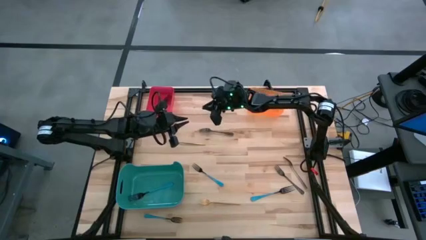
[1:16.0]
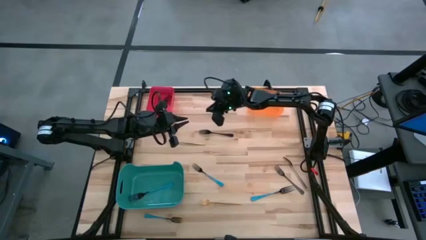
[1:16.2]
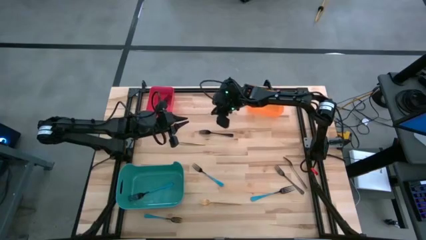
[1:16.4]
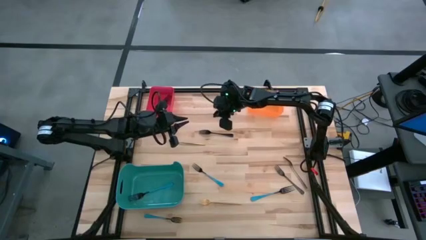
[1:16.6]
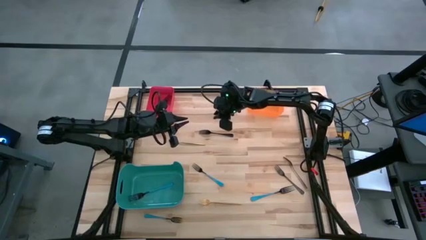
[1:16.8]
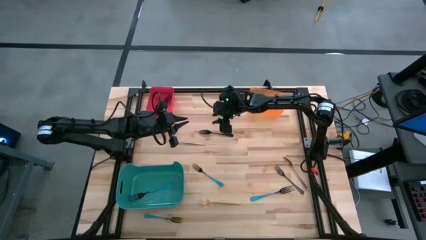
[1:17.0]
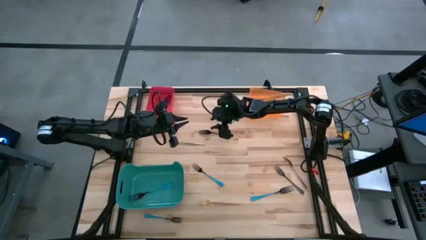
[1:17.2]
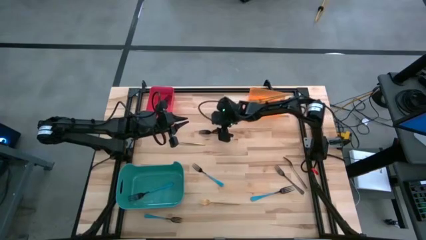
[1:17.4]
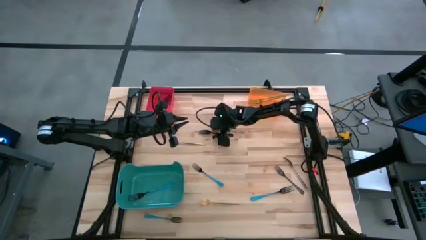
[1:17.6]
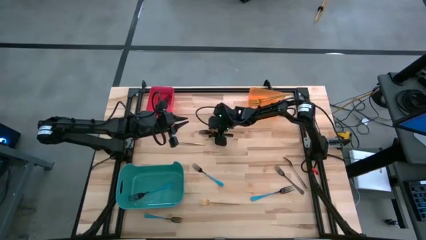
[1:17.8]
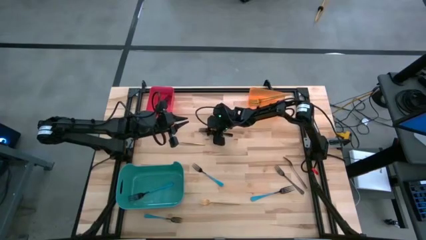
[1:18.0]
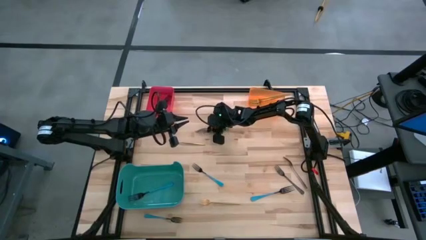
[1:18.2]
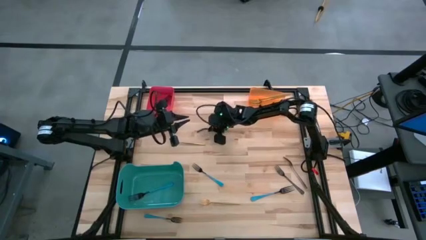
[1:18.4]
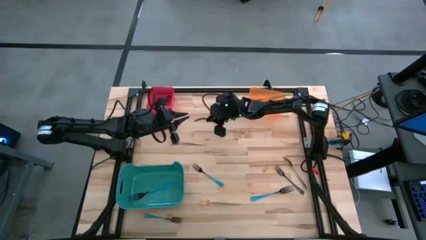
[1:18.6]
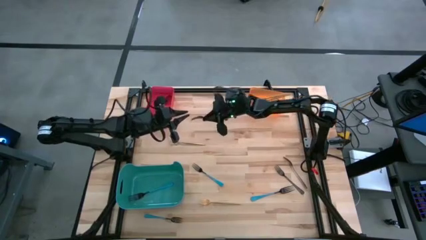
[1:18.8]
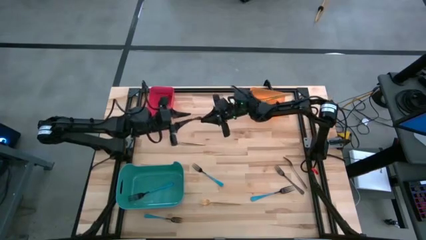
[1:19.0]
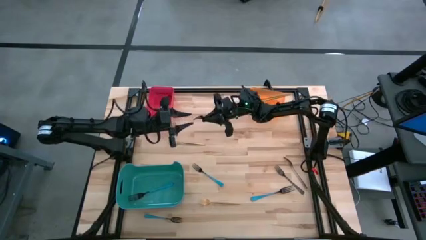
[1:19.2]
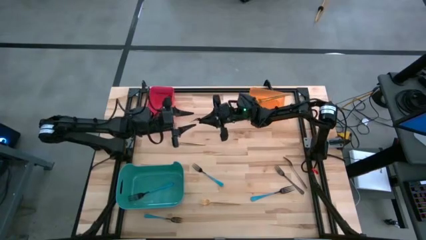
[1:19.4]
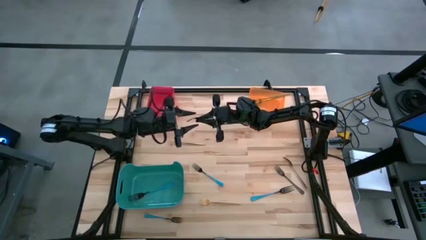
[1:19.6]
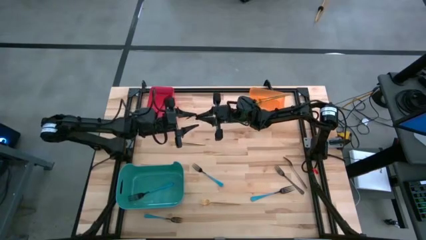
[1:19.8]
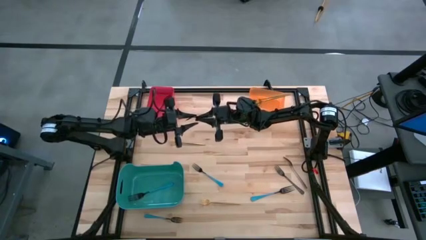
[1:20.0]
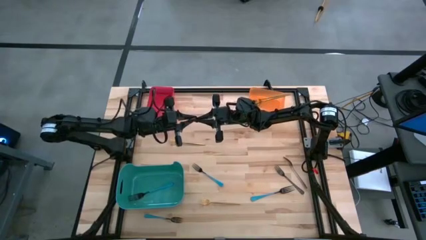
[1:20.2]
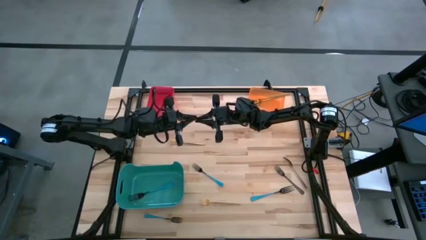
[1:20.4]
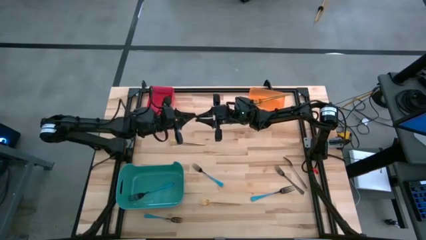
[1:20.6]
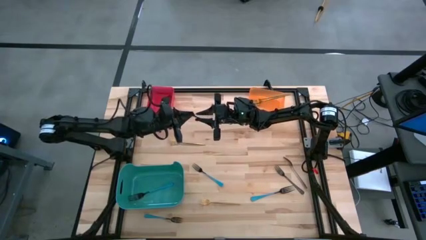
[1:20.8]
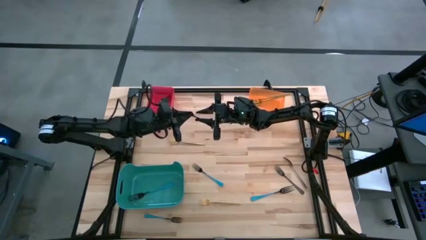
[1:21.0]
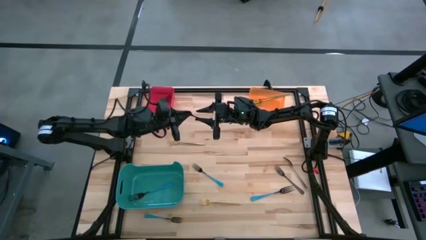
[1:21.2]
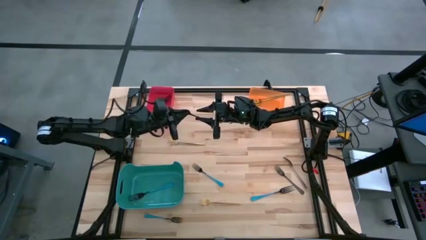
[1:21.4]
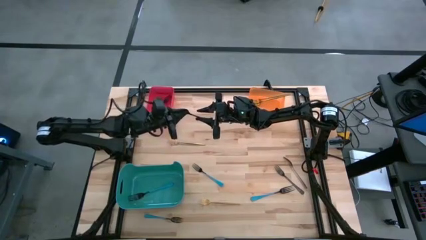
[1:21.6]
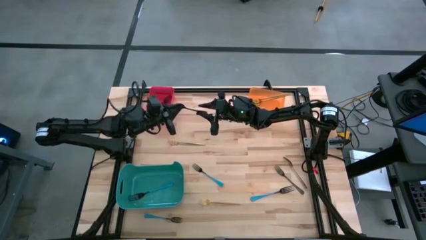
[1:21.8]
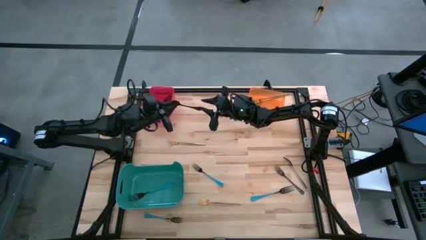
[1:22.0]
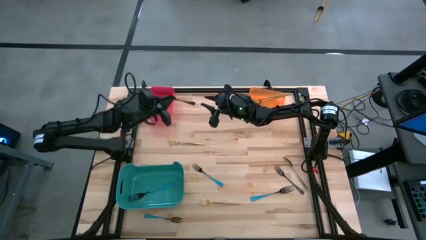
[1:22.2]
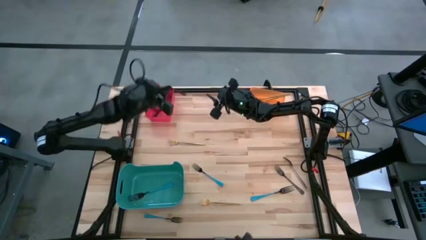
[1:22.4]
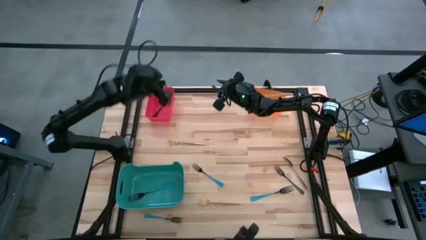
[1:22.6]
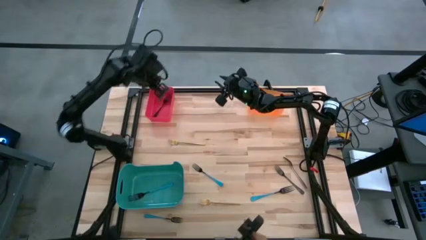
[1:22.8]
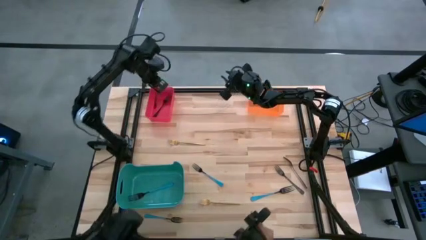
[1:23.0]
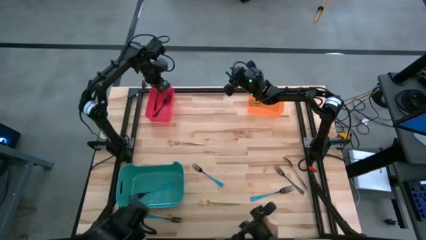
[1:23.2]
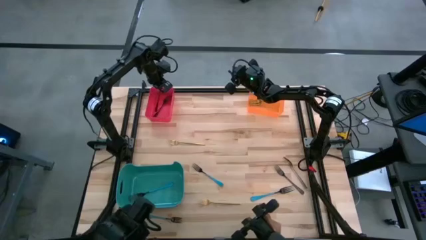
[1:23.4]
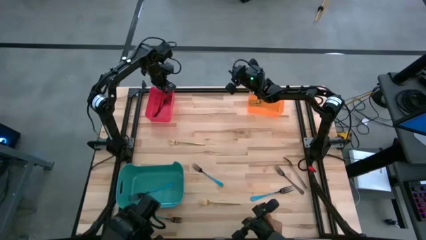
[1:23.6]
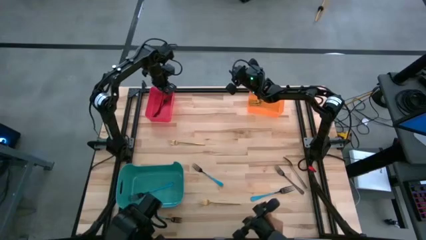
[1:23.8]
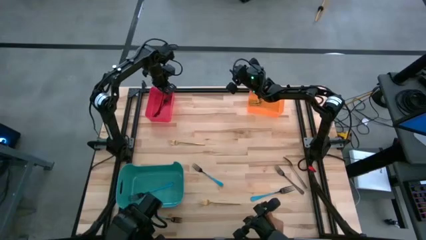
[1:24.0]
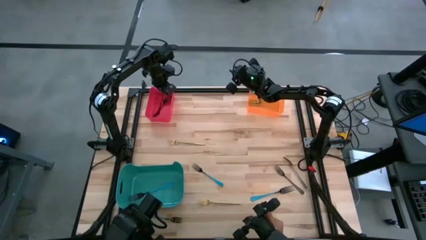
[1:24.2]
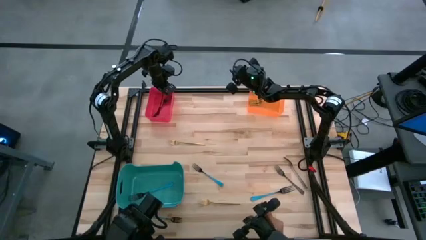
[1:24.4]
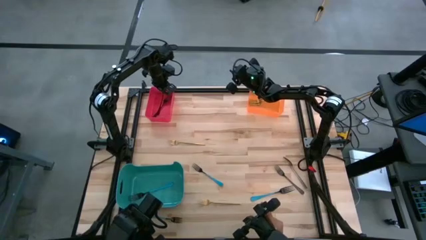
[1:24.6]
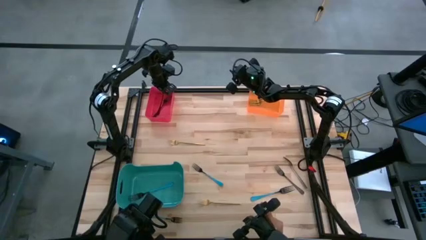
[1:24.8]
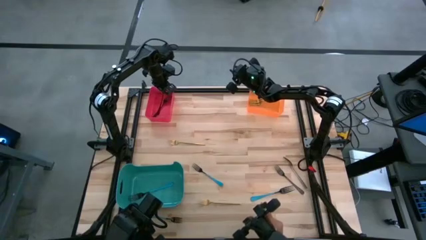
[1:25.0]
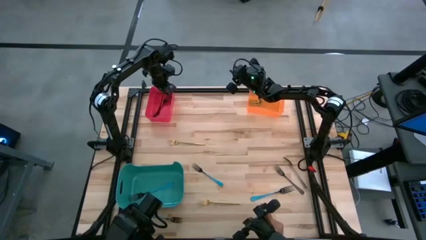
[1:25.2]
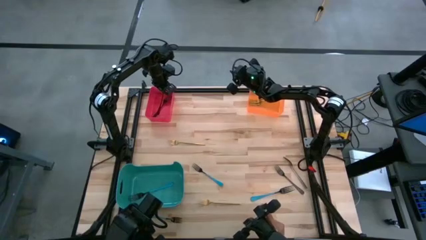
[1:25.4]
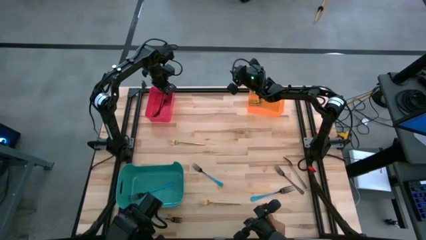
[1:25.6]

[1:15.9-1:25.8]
Task: Sort silverware by color (type)
Put the black fork into the red bin

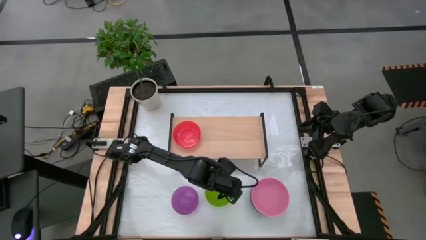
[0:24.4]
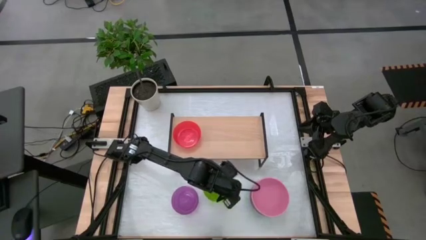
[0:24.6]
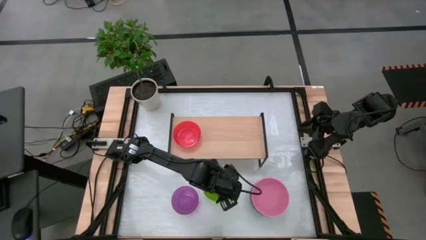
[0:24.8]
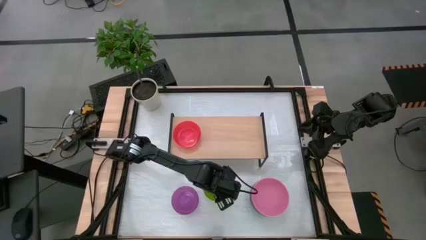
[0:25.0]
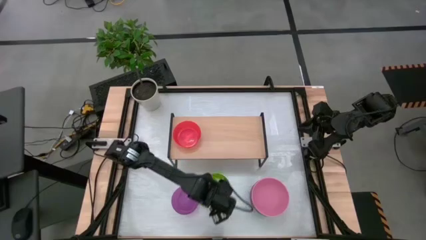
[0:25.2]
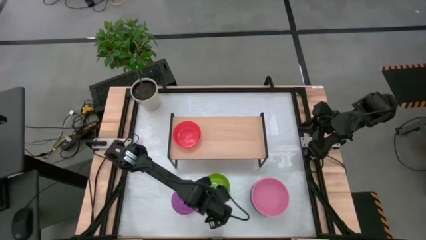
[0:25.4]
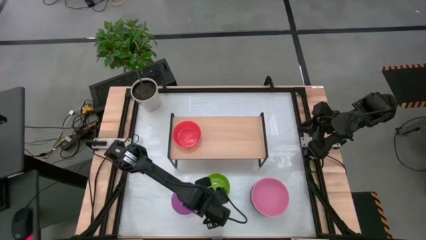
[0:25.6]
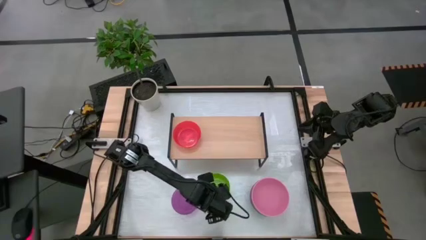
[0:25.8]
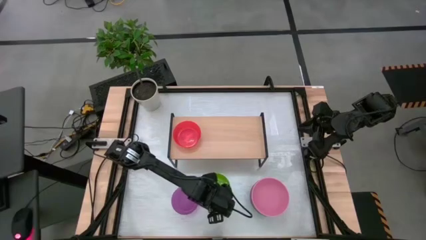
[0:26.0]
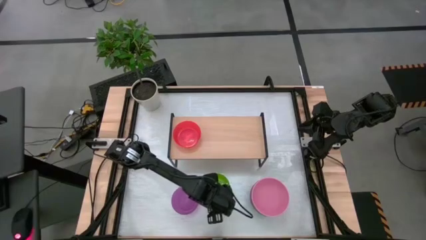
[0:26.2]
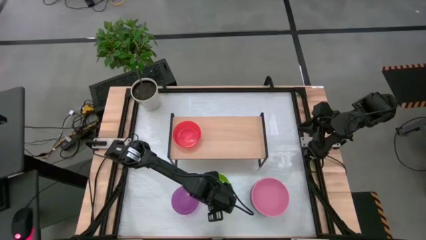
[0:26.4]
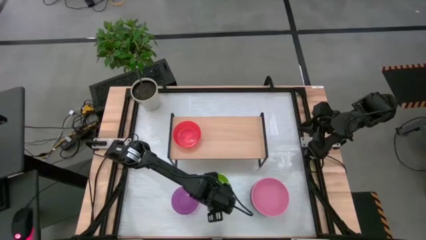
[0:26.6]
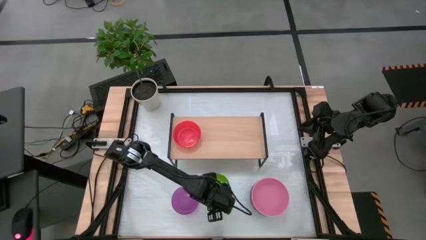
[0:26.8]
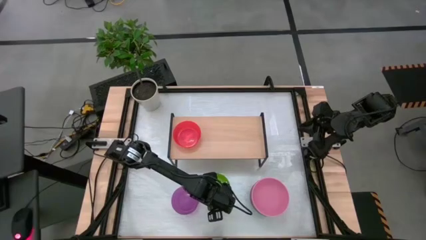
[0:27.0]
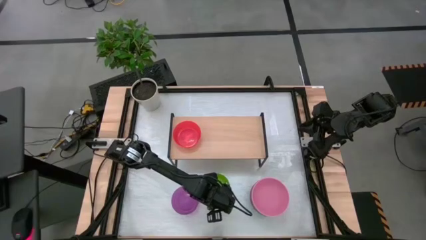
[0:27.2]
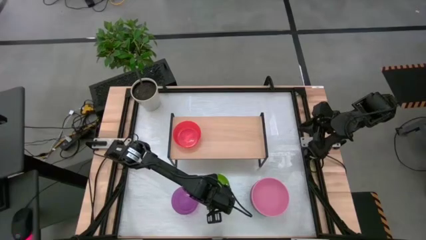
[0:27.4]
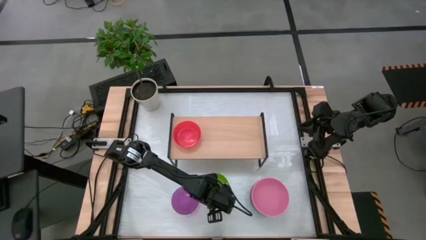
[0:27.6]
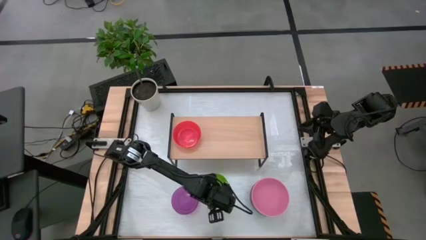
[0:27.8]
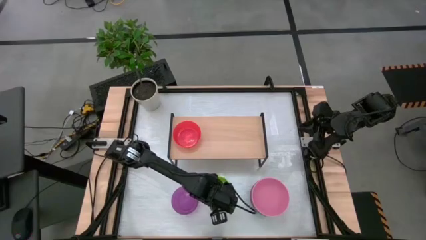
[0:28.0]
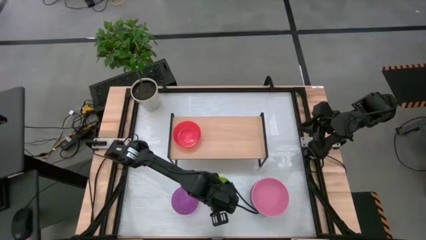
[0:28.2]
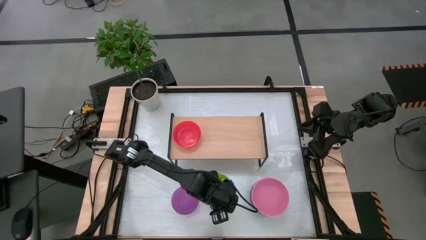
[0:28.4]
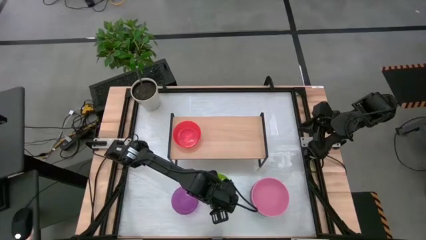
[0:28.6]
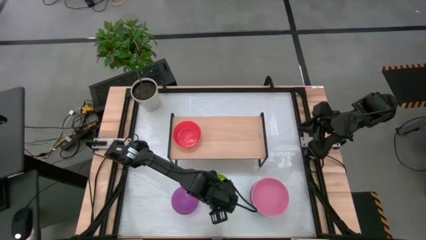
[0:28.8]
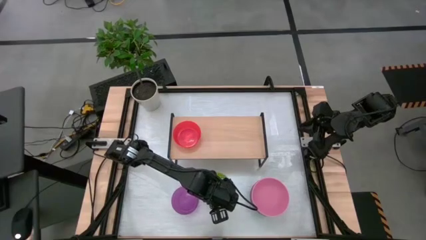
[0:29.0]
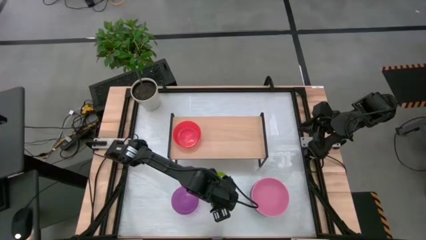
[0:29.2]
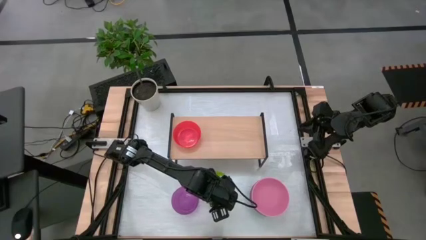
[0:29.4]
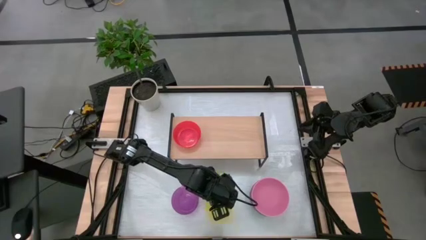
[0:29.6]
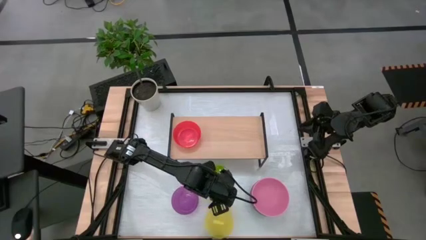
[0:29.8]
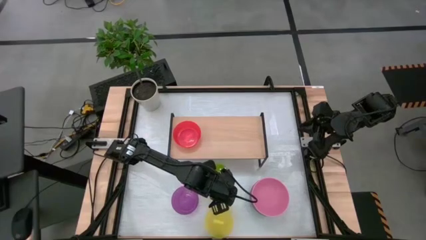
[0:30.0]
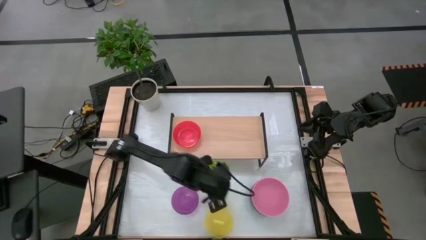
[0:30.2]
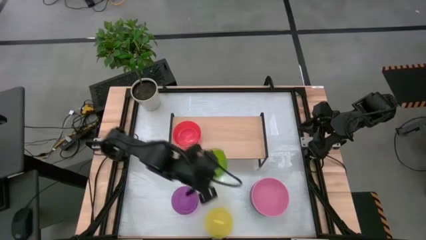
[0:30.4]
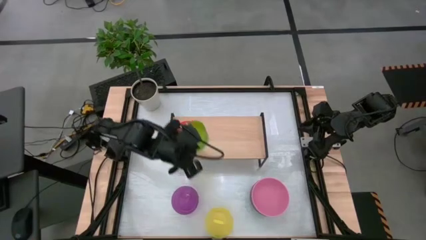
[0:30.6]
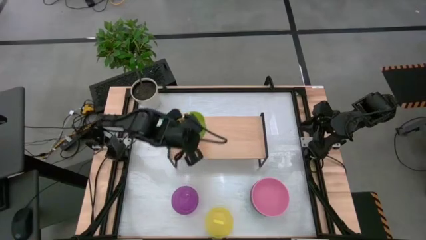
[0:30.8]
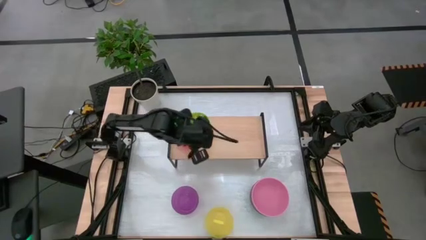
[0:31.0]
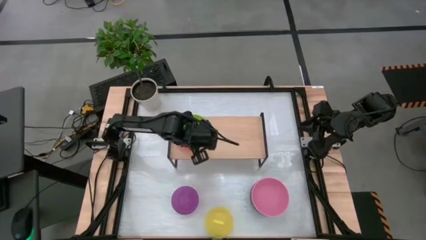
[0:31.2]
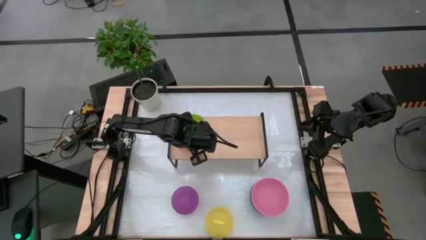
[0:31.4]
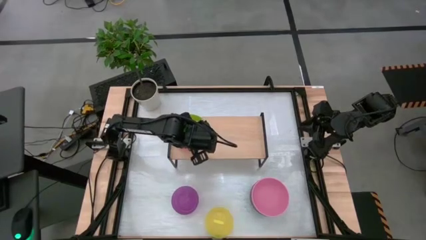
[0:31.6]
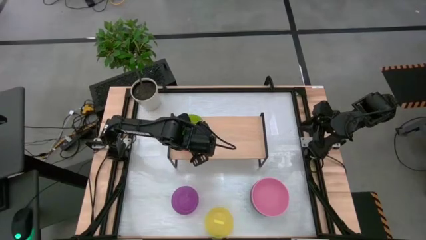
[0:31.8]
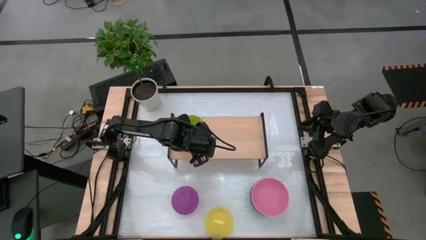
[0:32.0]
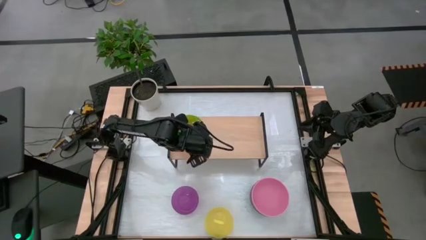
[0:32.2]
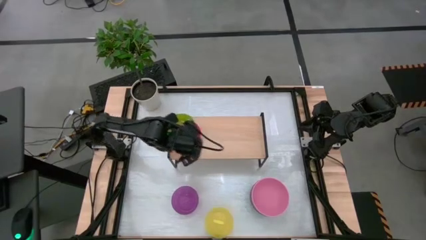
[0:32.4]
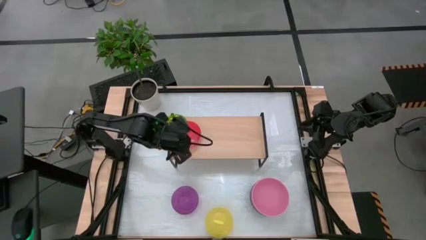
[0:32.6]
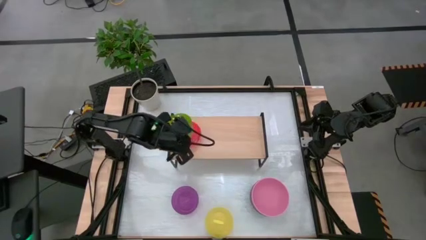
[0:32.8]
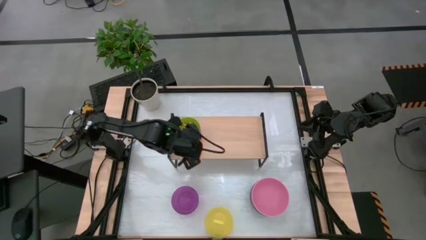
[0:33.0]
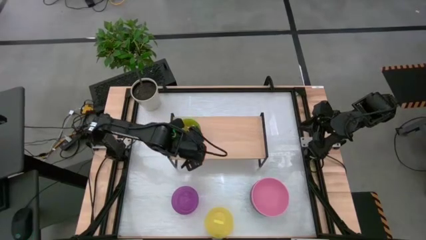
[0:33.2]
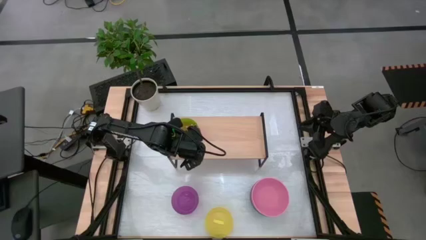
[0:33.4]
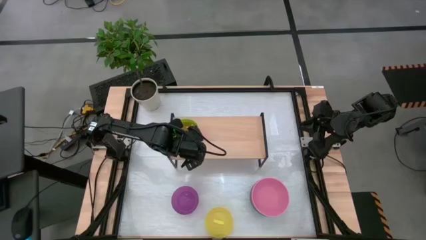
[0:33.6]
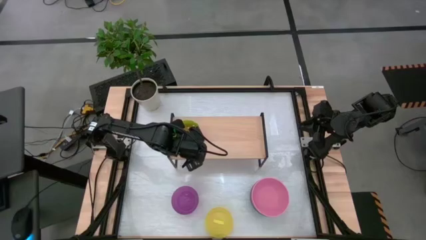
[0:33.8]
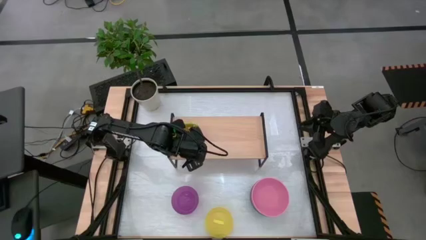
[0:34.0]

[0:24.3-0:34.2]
Task: Place and stack bowls onto a shelf
Stack the small green bowl on top of the red bowl on the shelf
